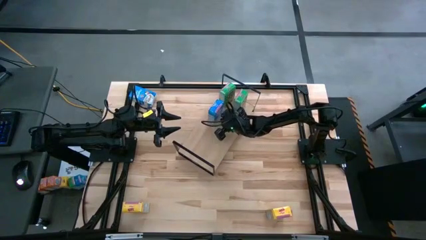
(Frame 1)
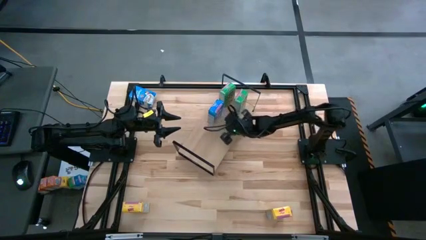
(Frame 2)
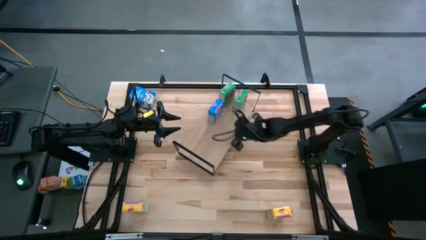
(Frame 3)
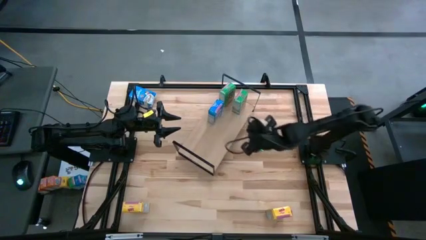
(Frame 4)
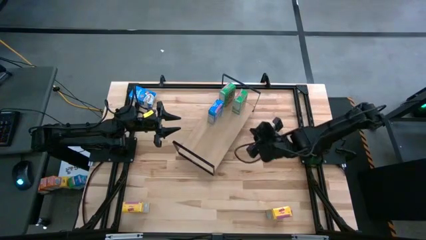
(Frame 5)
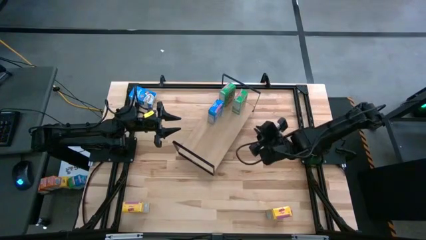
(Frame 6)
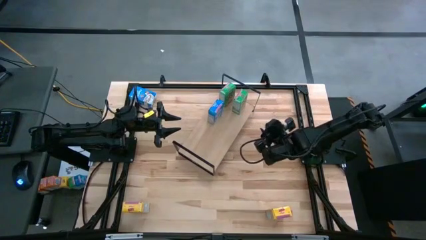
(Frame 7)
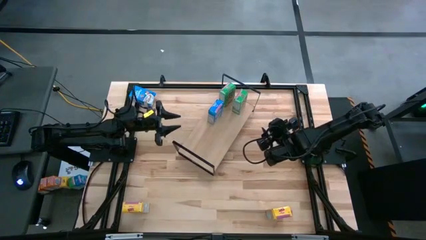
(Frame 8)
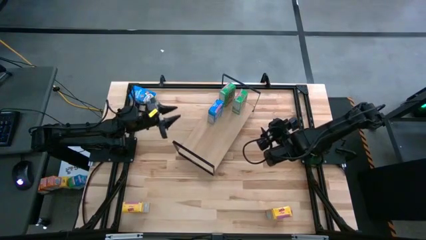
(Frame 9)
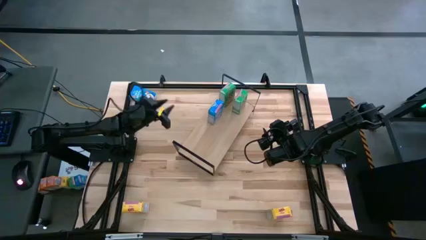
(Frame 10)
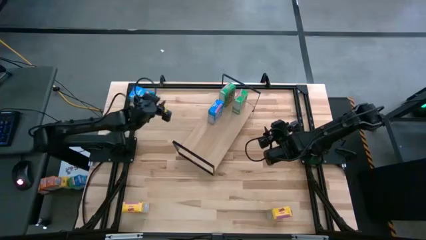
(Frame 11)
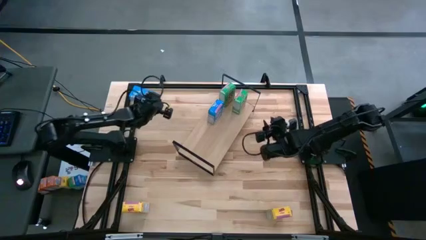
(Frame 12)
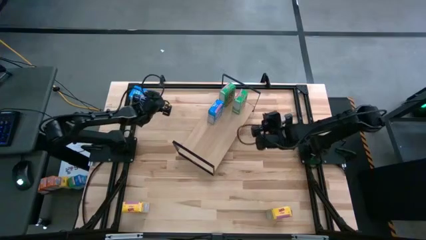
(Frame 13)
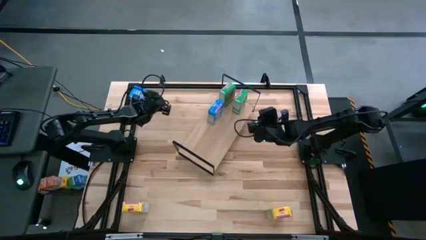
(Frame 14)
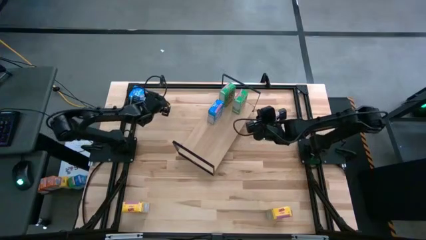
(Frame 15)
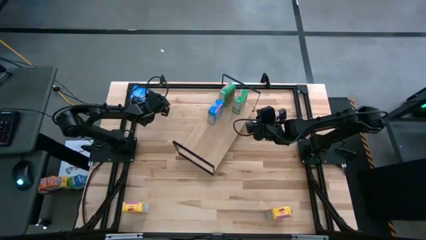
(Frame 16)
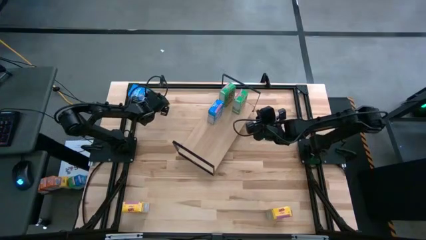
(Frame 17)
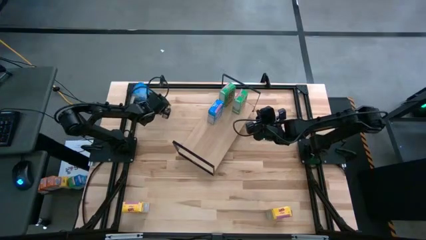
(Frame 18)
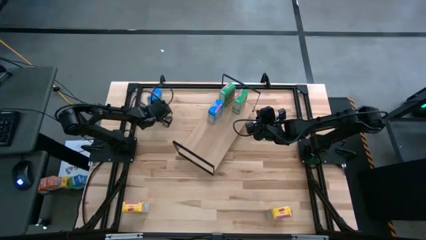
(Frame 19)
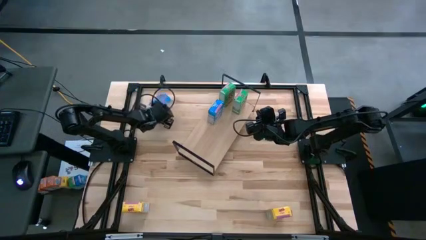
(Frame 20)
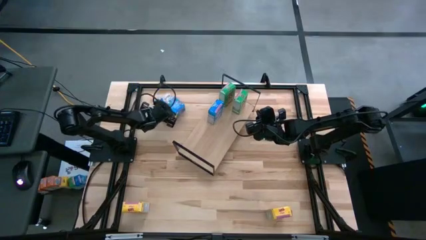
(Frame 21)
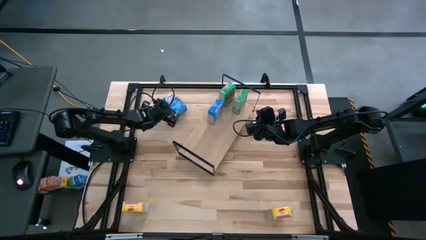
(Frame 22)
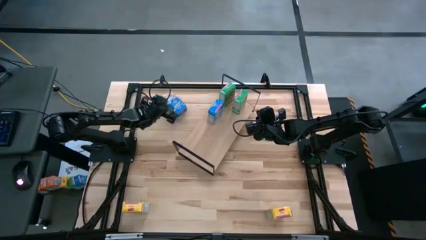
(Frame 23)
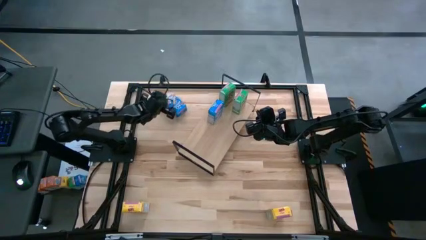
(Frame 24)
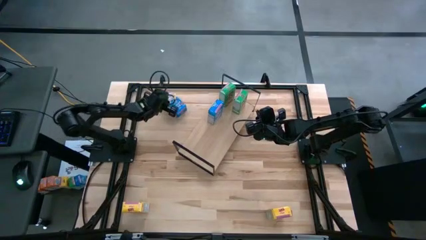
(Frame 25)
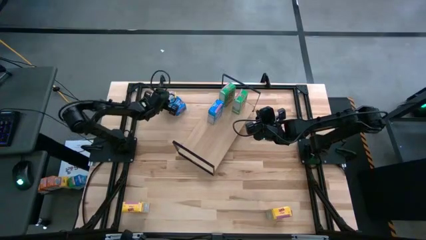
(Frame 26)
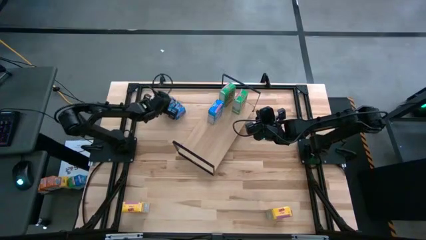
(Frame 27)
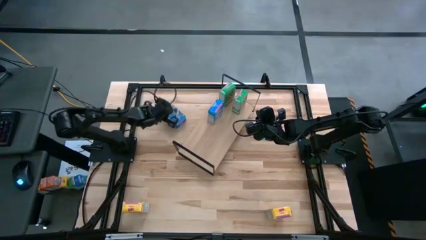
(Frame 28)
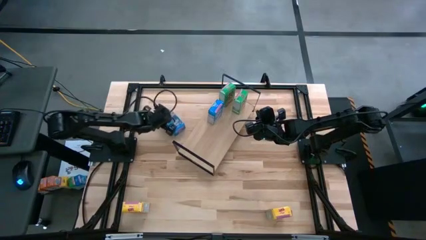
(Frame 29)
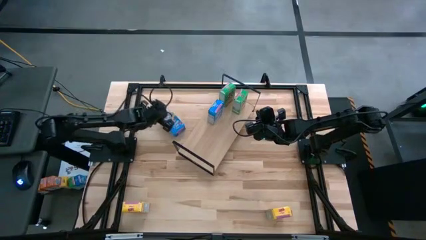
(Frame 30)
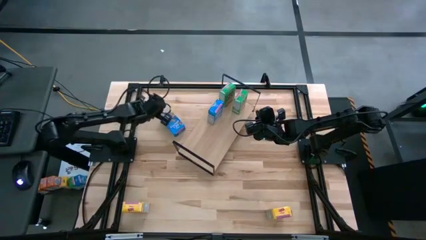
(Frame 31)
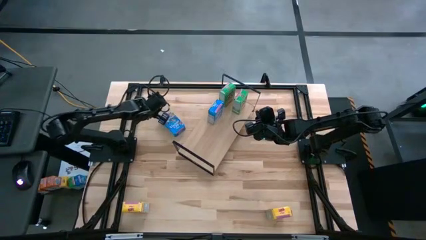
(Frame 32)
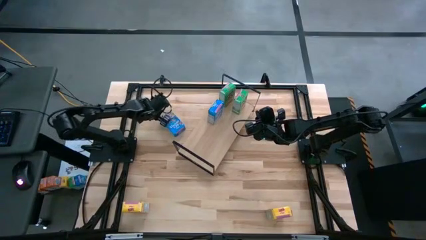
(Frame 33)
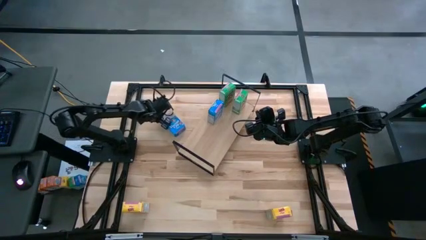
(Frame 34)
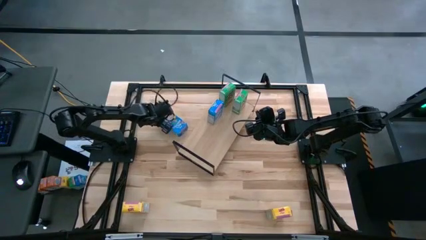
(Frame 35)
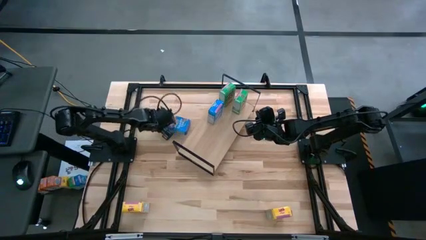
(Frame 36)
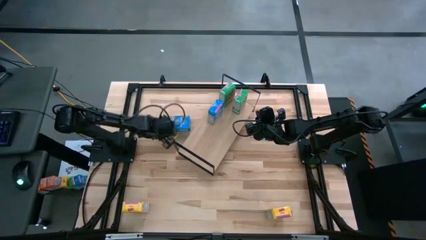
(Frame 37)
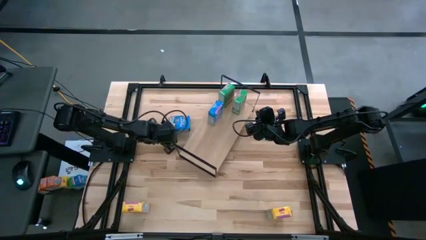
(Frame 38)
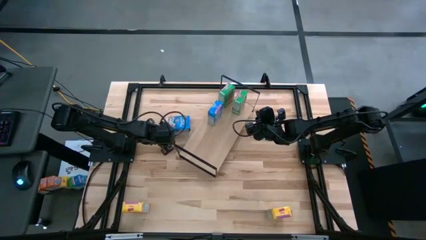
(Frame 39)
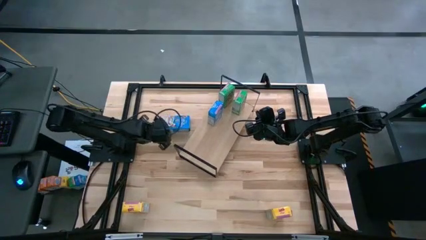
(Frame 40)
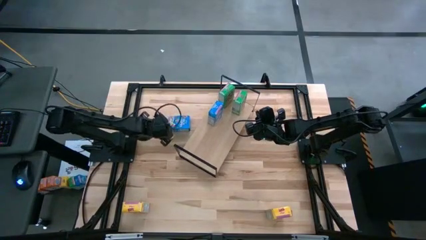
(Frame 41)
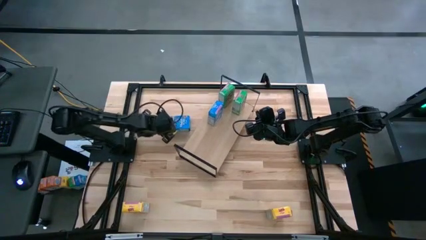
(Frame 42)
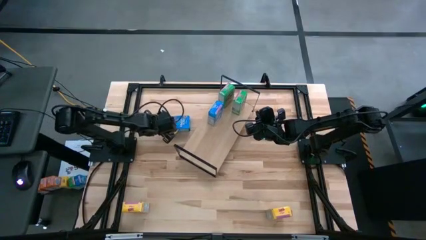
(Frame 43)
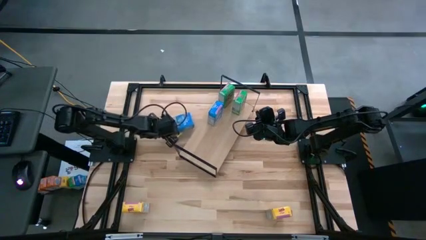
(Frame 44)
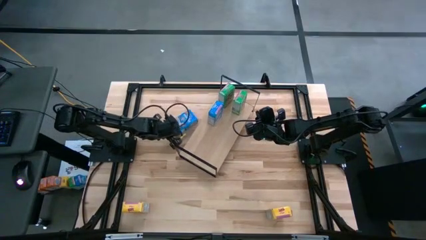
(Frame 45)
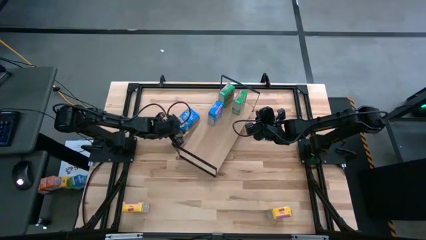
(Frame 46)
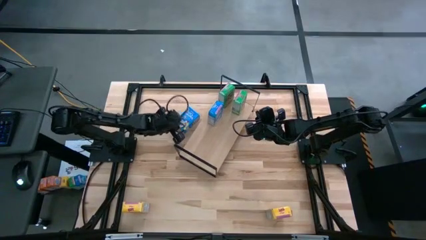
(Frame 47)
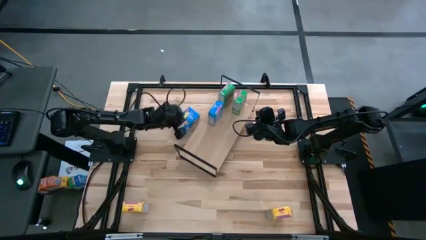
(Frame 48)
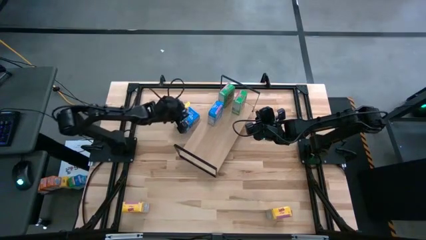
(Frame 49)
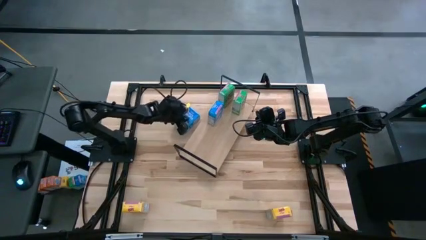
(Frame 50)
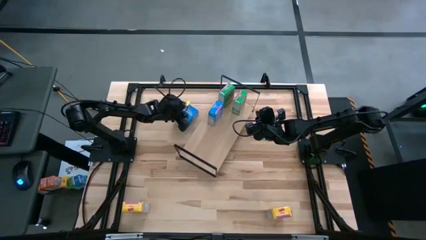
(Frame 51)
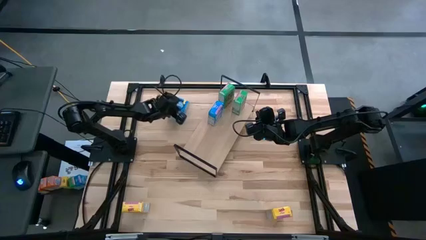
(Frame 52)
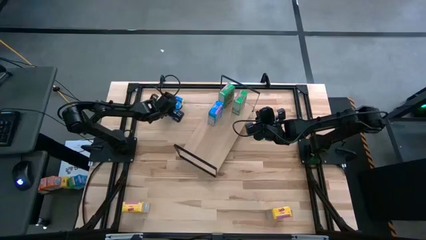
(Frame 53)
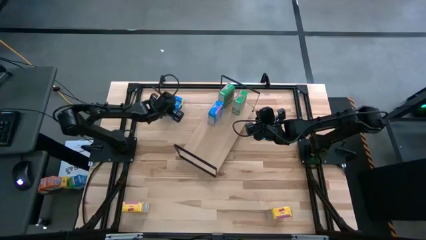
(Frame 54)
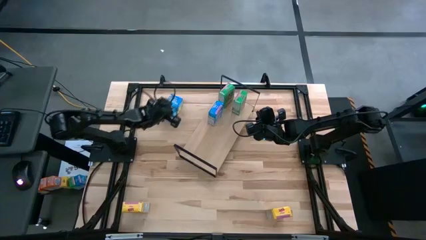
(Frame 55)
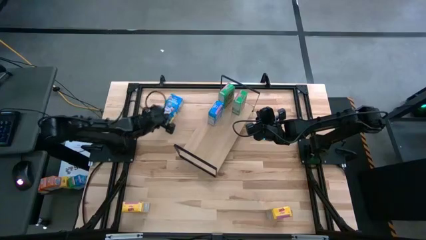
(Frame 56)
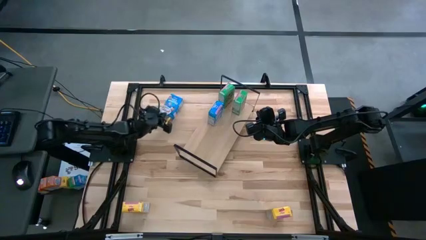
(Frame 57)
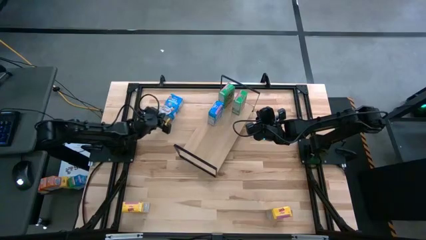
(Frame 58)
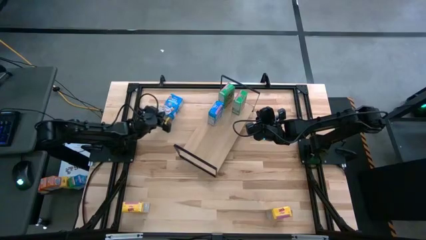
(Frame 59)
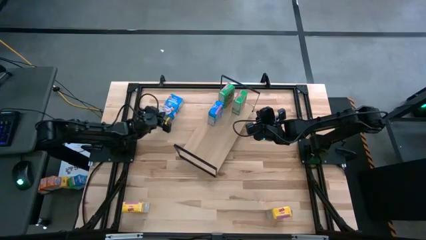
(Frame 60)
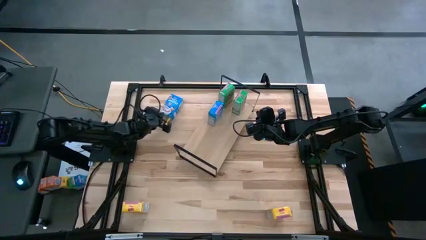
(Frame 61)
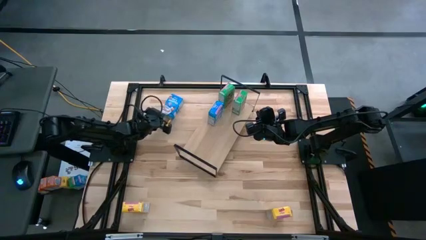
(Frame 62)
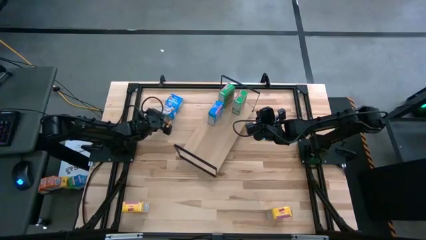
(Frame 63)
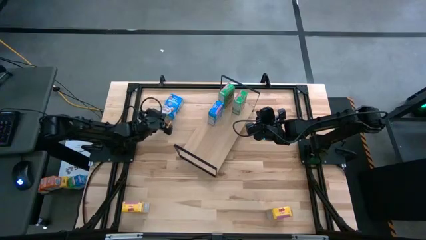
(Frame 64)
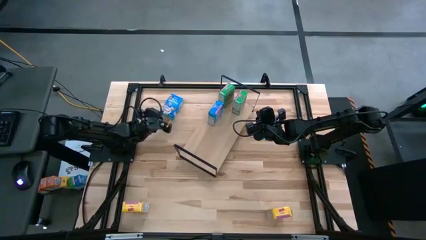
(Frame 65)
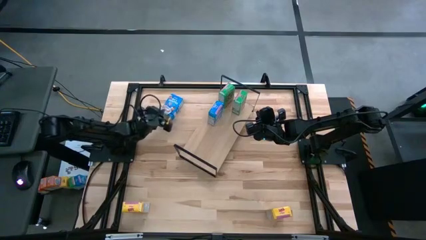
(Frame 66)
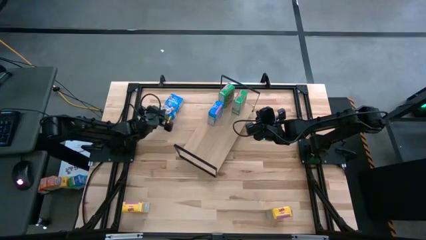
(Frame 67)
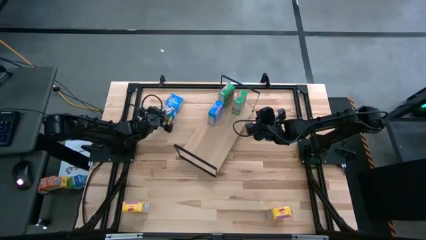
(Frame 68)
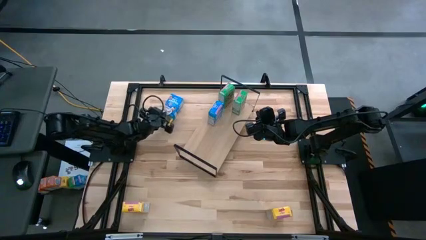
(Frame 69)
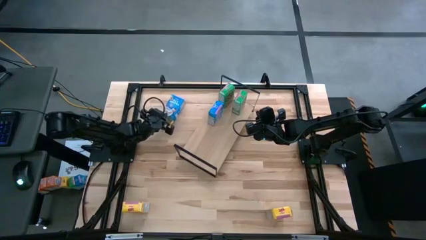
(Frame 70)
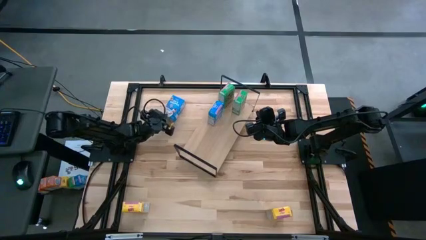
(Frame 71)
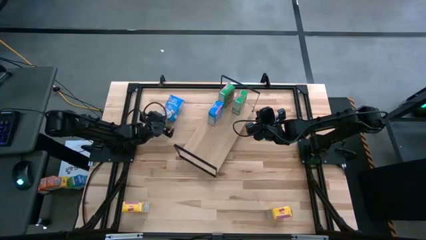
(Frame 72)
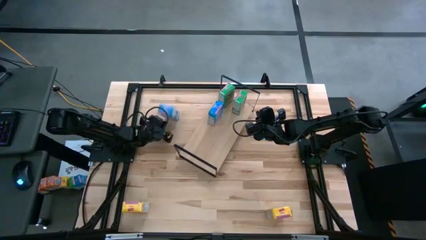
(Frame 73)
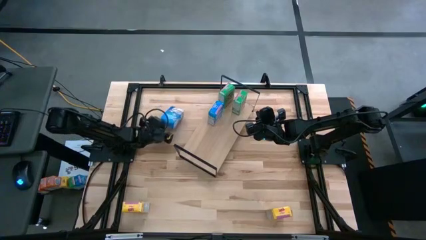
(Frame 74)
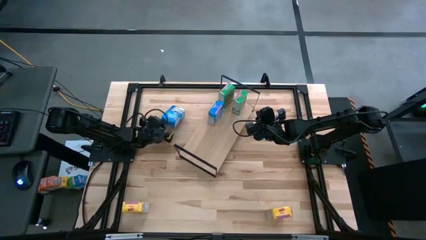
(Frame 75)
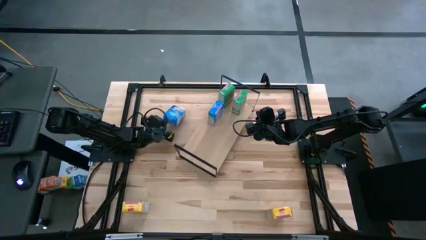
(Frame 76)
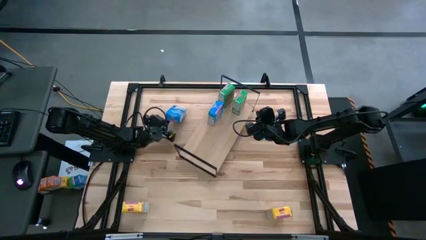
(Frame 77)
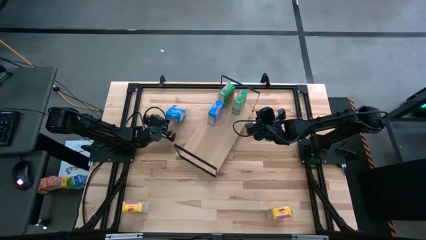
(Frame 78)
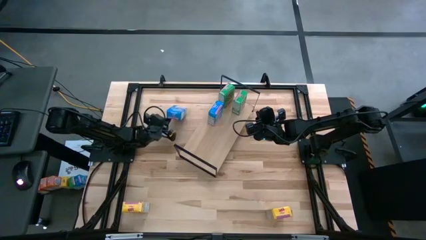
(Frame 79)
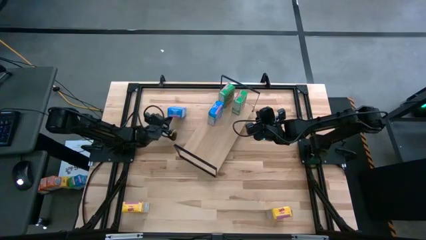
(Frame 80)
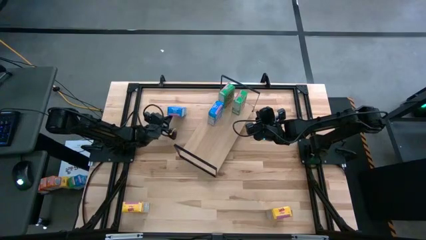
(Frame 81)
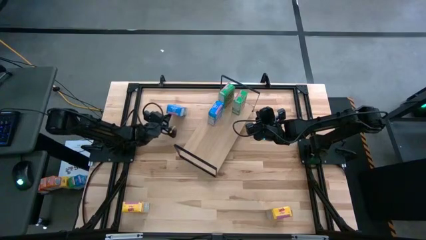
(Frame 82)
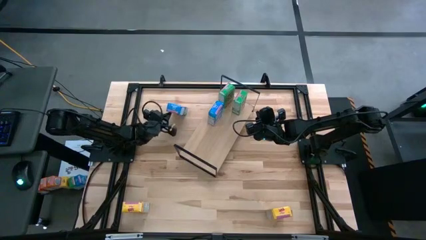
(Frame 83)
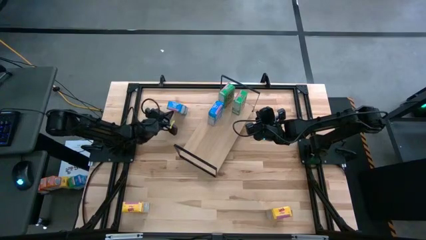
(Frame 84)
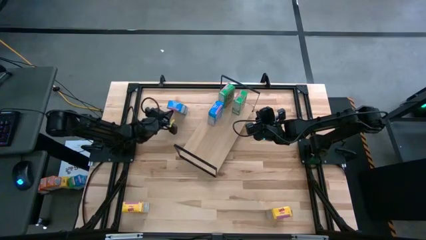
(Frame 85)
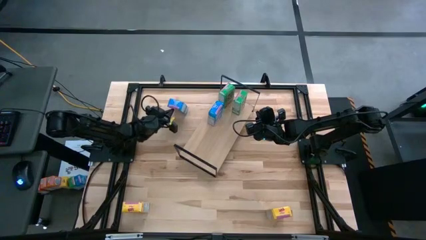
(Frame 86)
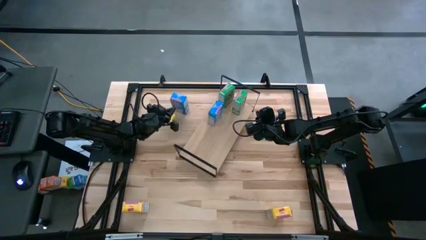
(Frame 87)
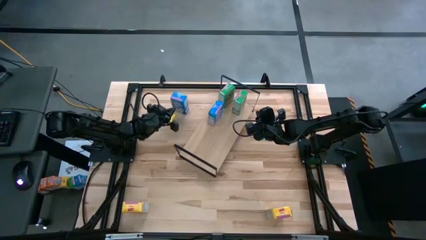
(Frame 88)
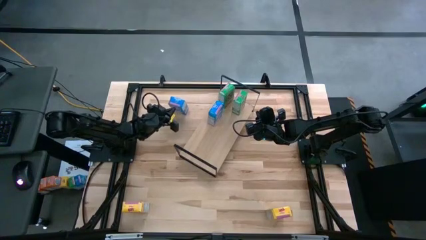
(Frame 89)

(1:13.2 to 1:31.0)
Task: Stack cereal on shelf
Put the blue cereal box aligned with the other blue cereal box on the shelf
